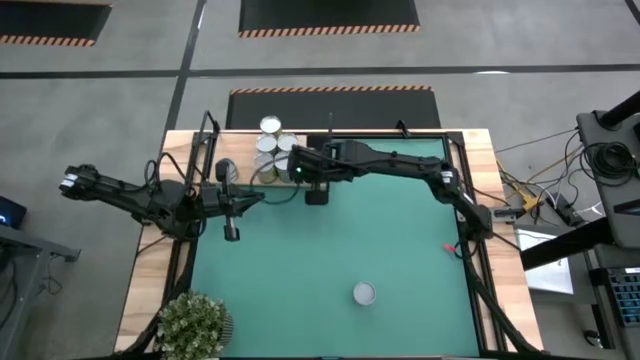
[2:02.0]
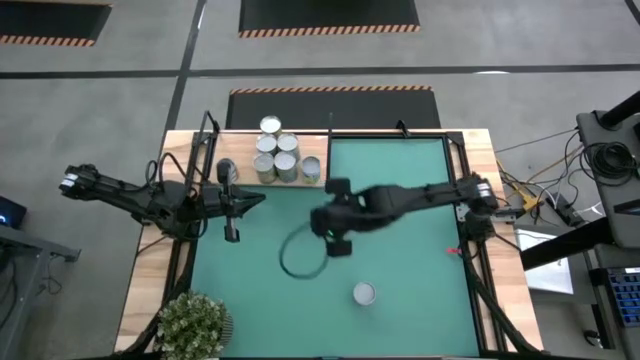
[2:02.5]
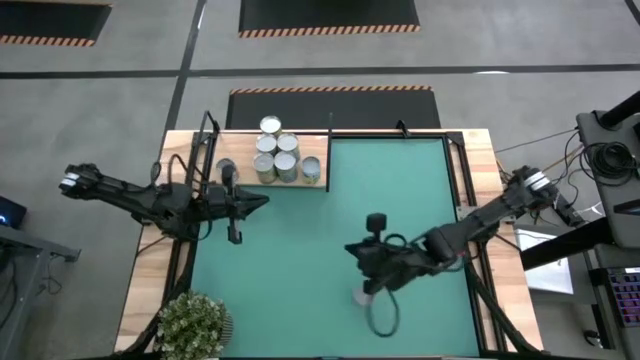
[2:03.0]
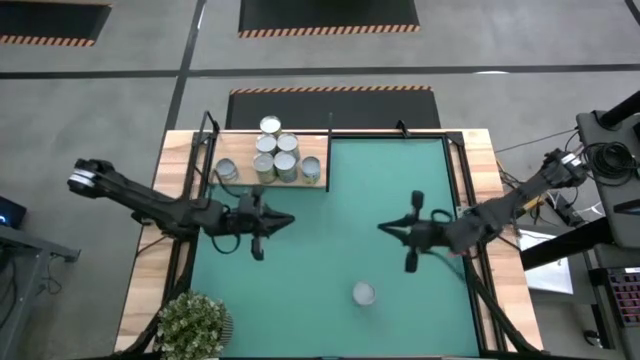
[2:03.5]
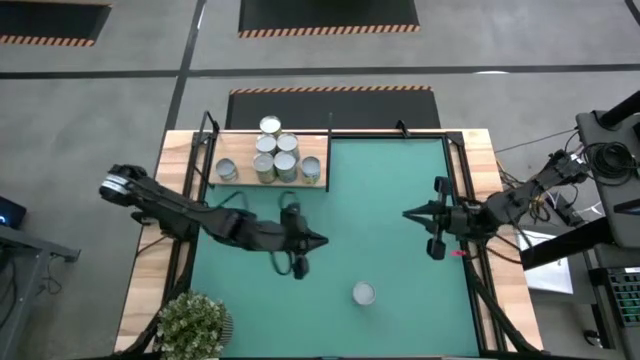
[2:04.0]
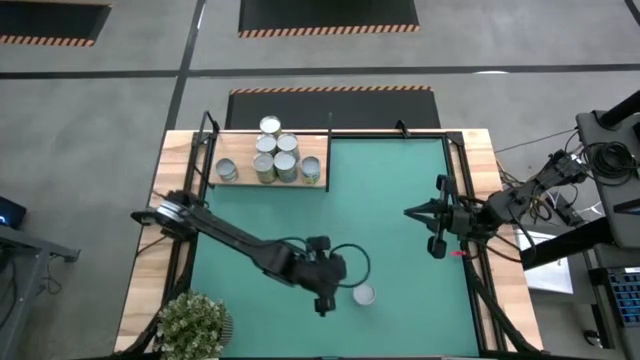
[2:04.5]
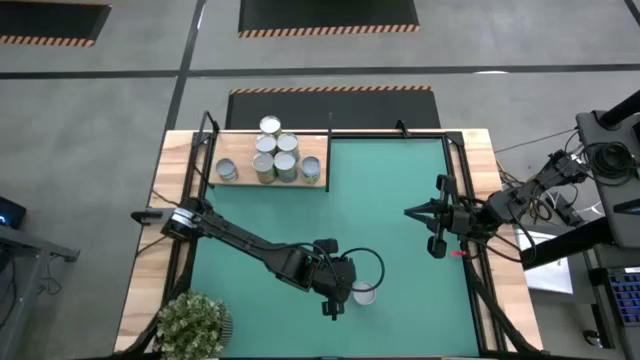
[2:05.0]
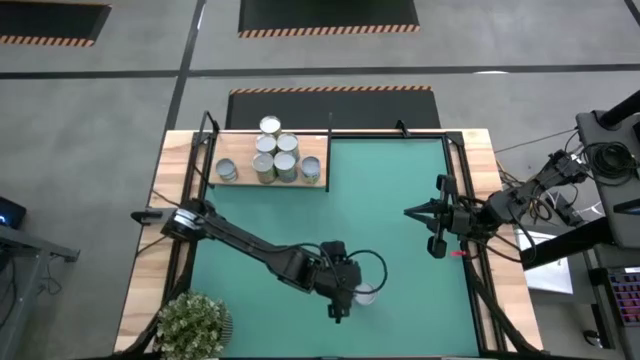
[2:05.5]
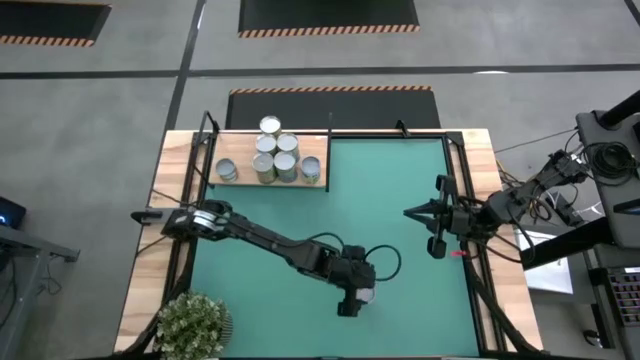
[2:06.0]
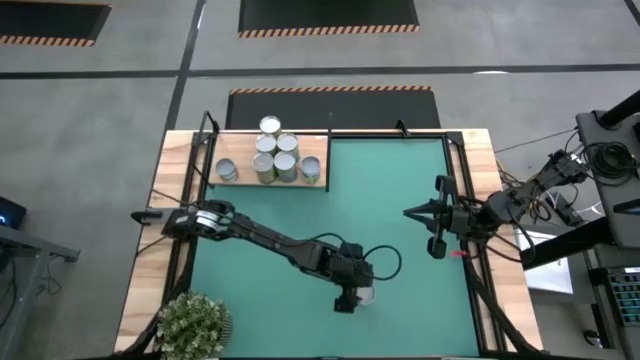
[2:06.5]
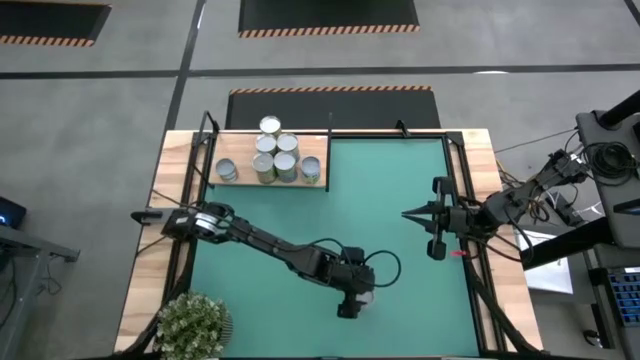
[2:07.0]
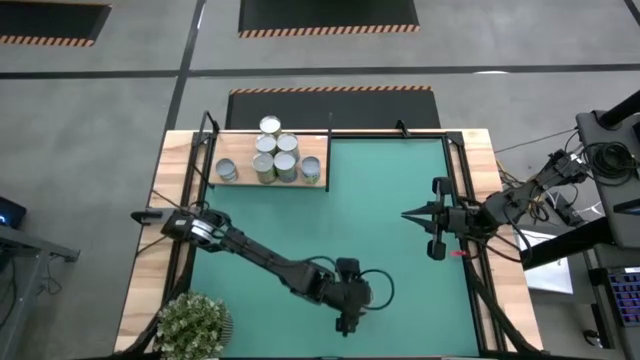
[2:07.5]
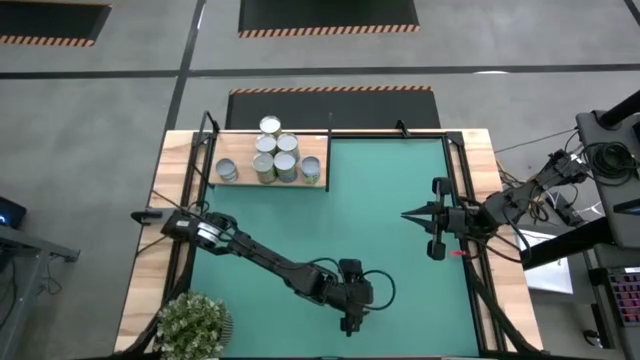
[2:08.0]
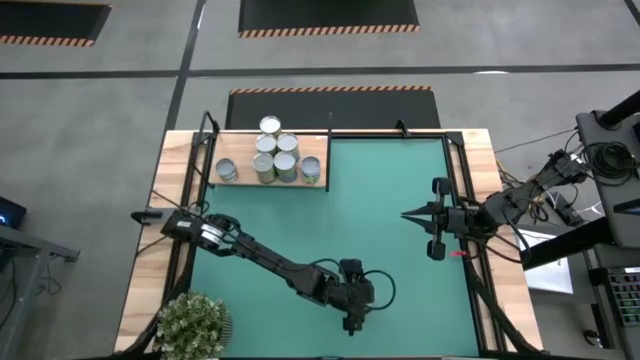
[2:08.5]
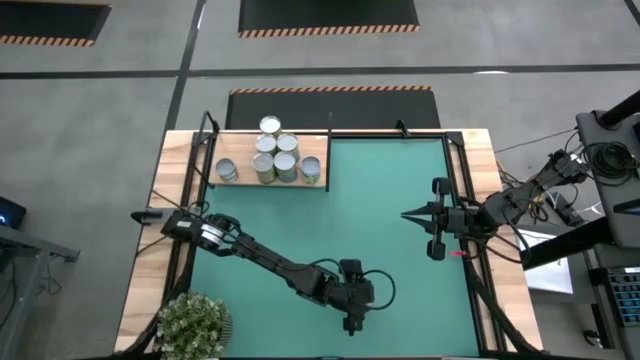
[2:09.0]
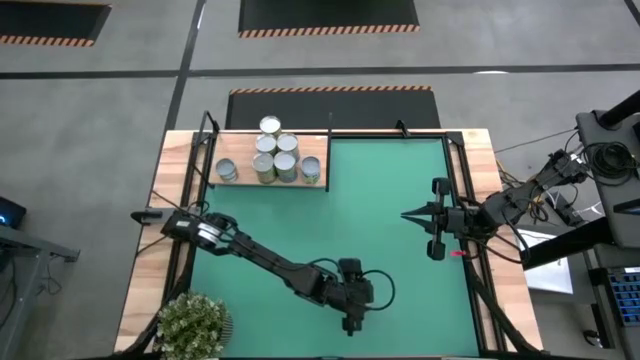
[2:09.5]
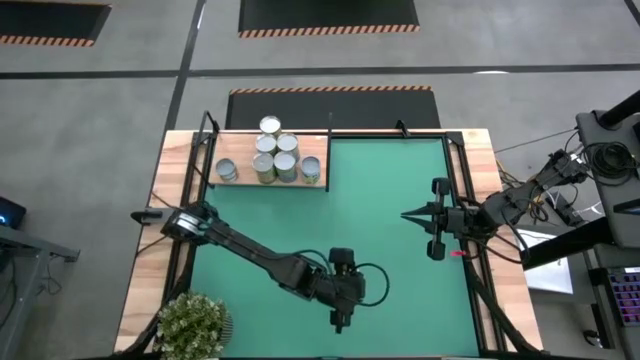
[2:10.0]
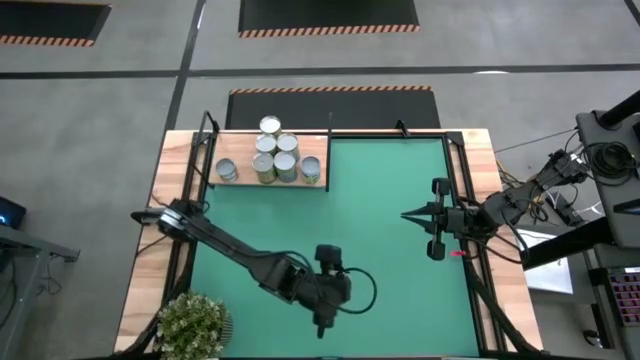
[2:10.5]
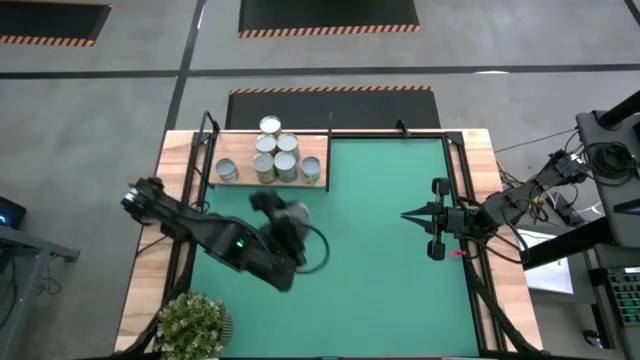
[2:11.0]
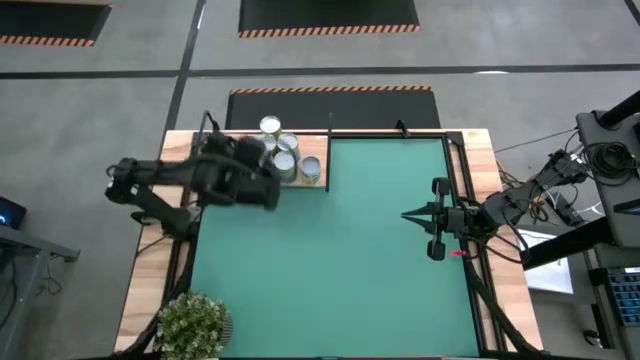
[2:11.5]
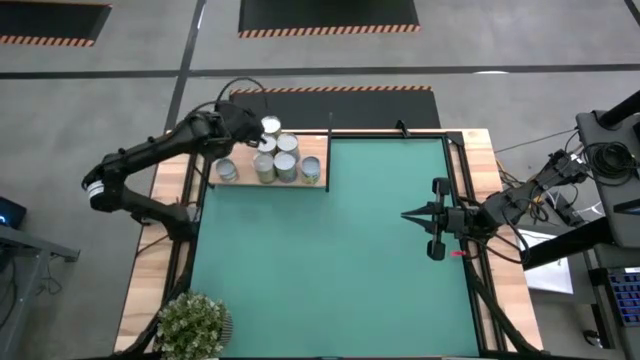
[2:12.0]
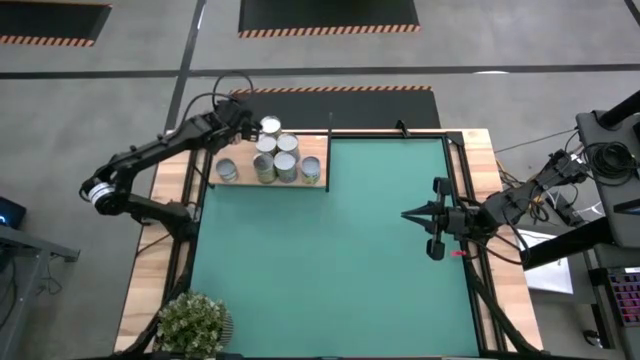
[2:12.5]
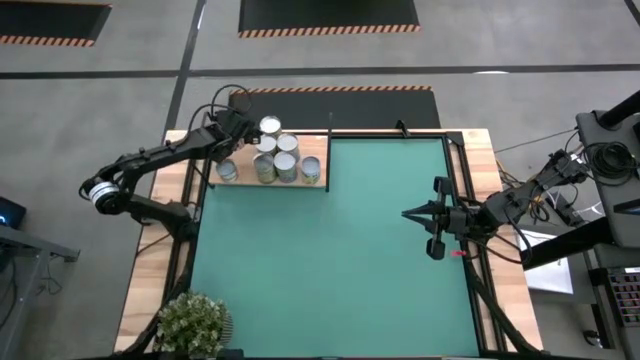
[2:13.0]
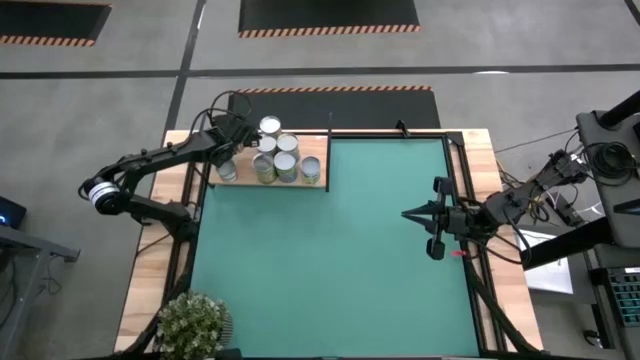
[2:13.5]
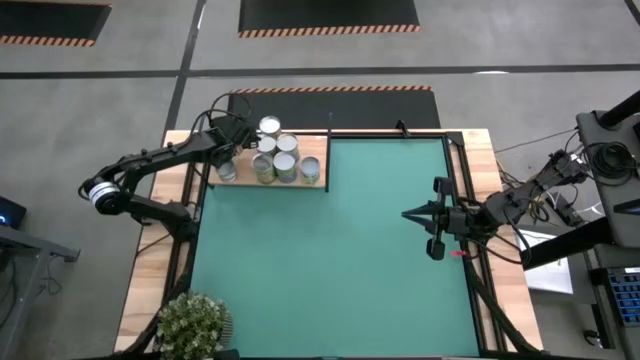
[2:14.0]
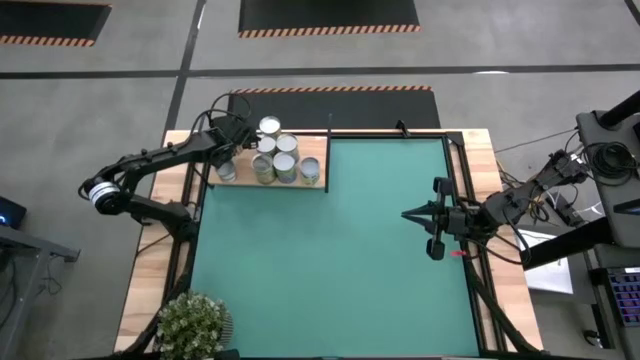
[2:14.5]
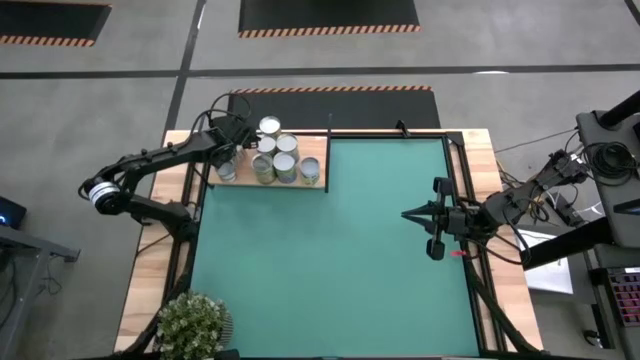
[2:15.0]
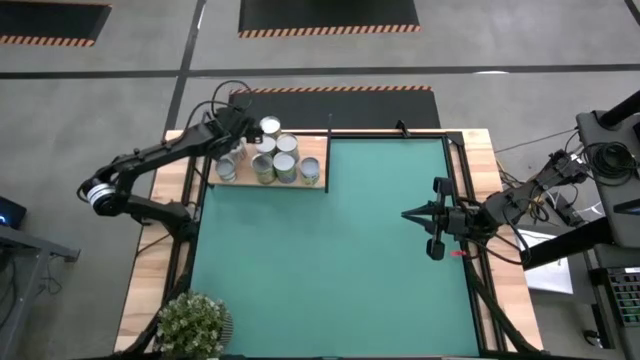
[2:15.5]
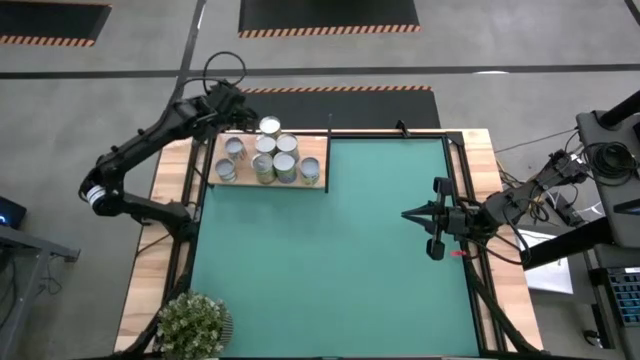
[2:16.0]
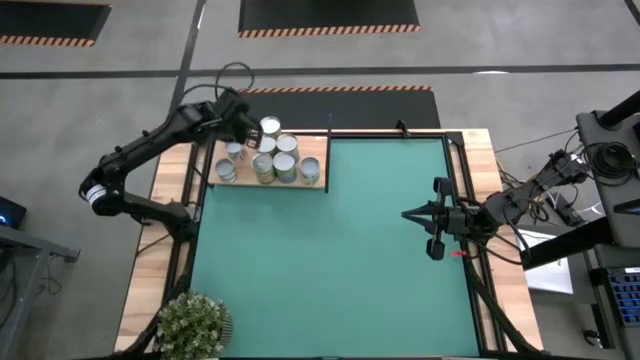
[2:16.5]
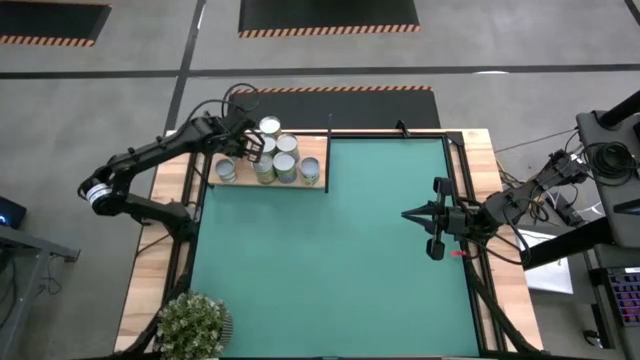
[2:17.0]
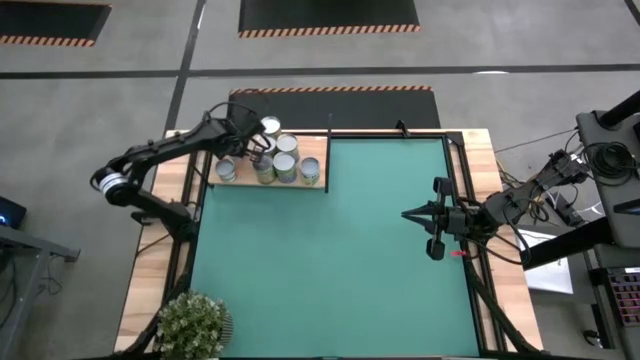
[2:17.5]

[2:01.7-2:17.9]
Task: Pick and place cans onto a shelf
Put the canned carrots on the shelf
